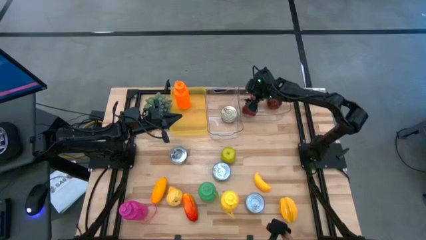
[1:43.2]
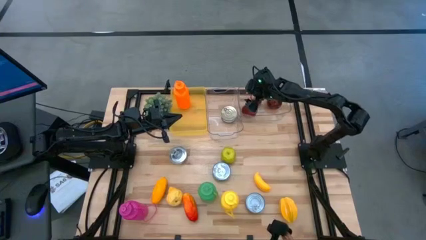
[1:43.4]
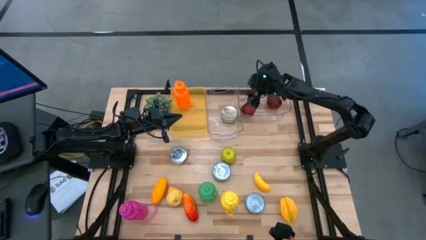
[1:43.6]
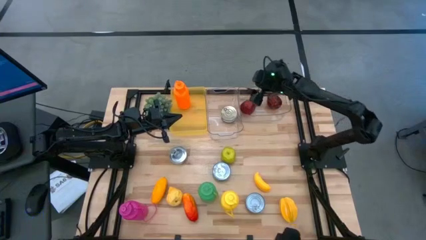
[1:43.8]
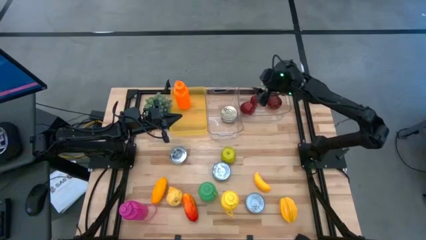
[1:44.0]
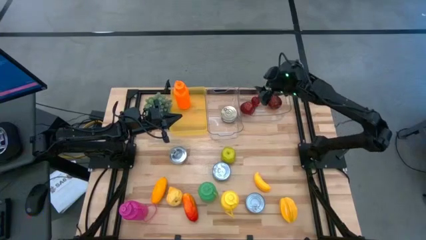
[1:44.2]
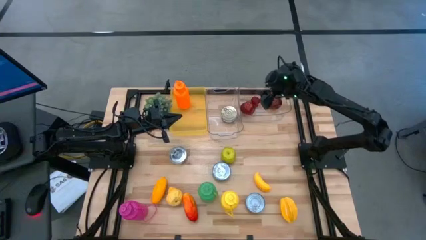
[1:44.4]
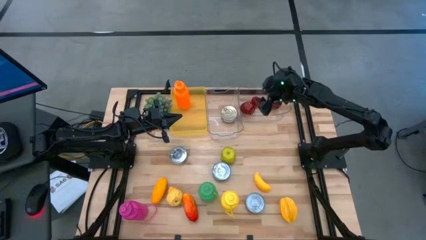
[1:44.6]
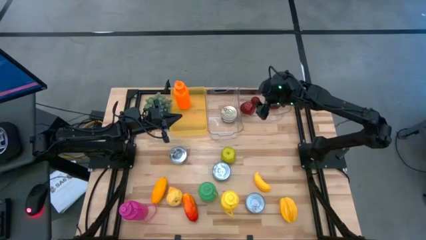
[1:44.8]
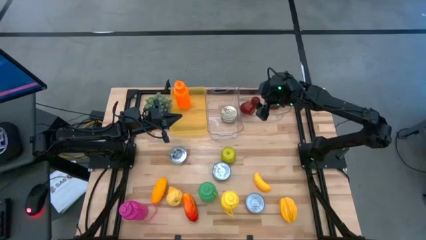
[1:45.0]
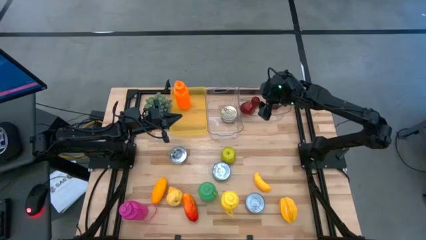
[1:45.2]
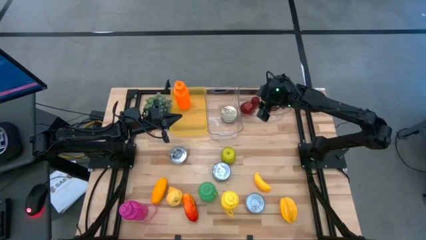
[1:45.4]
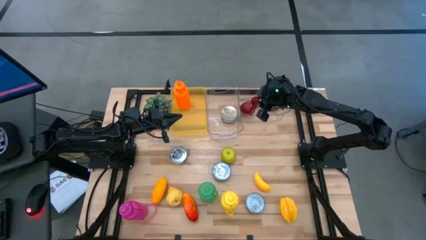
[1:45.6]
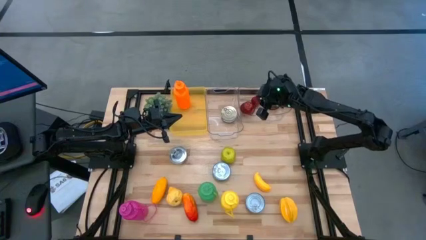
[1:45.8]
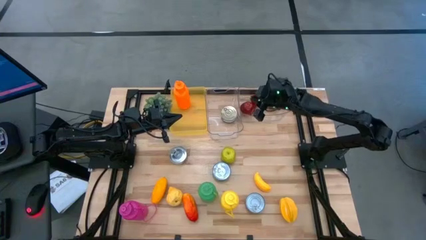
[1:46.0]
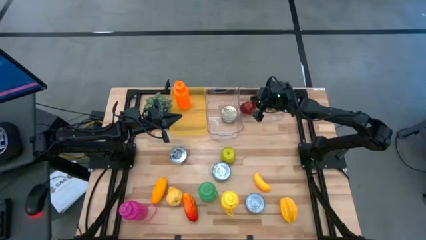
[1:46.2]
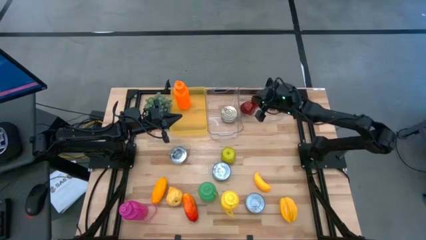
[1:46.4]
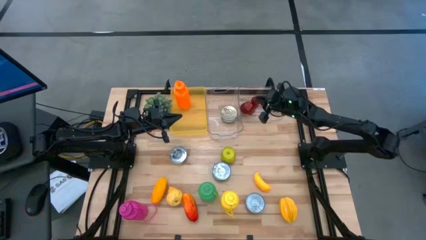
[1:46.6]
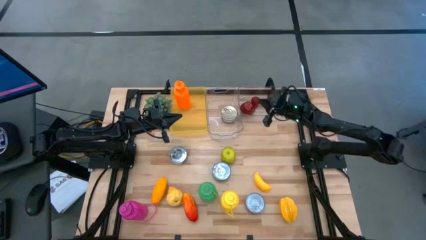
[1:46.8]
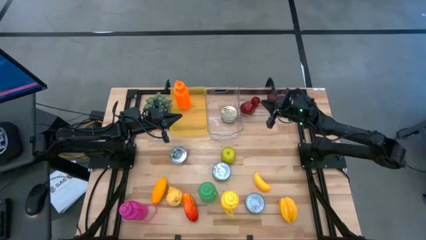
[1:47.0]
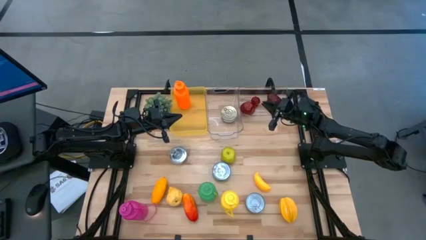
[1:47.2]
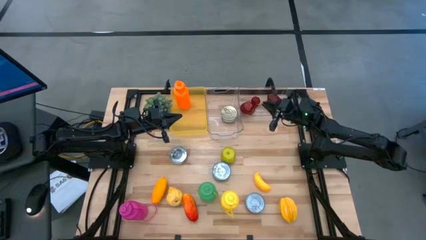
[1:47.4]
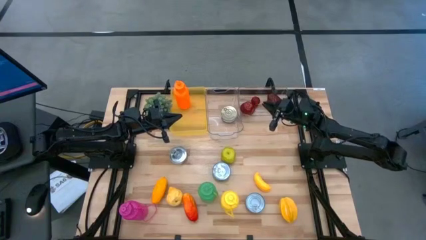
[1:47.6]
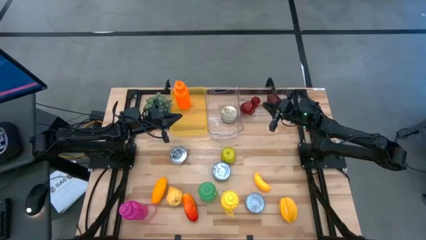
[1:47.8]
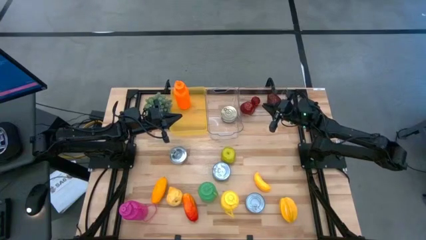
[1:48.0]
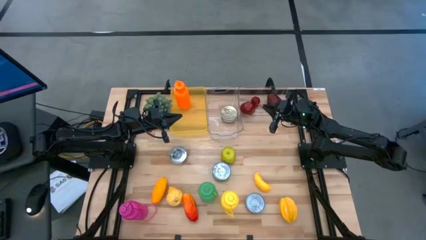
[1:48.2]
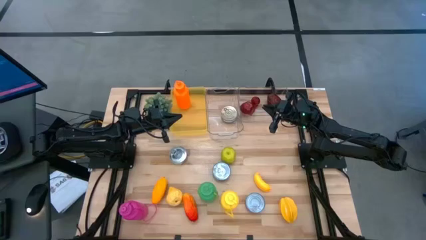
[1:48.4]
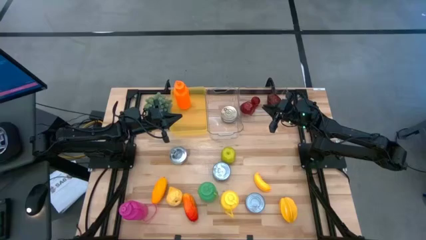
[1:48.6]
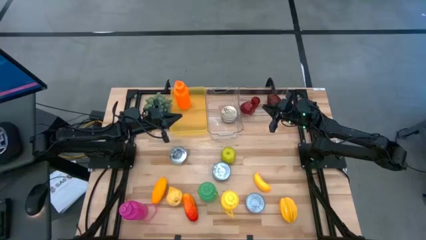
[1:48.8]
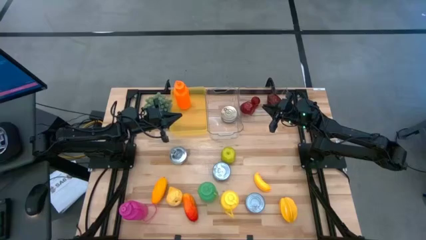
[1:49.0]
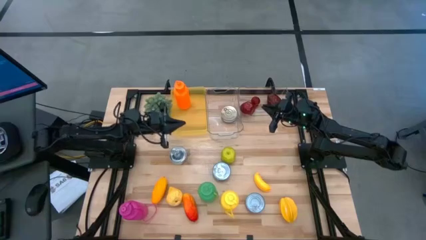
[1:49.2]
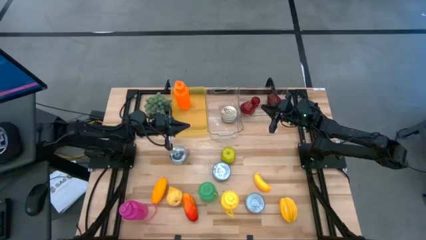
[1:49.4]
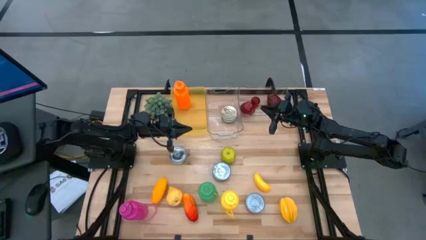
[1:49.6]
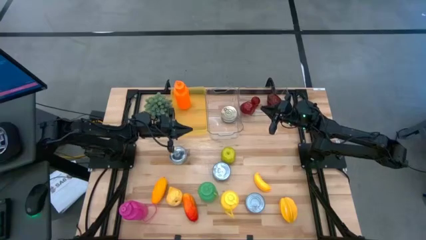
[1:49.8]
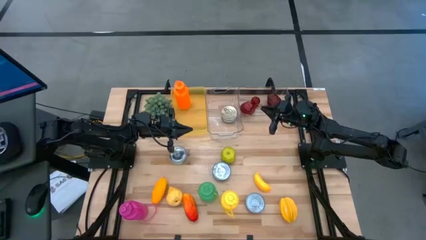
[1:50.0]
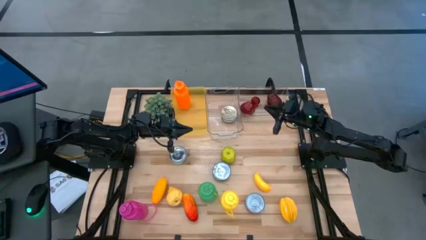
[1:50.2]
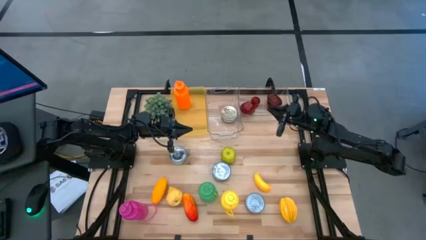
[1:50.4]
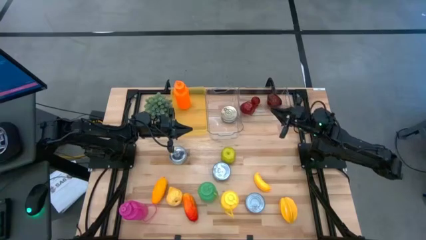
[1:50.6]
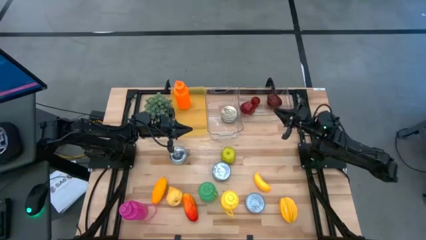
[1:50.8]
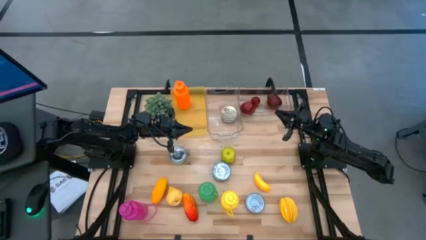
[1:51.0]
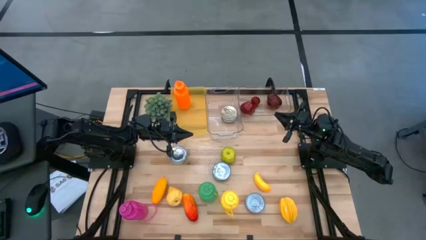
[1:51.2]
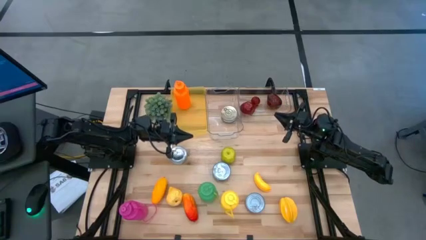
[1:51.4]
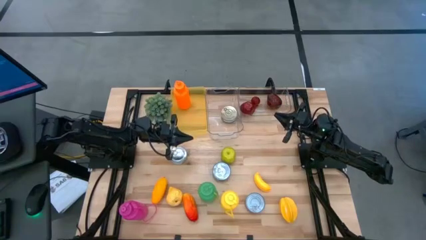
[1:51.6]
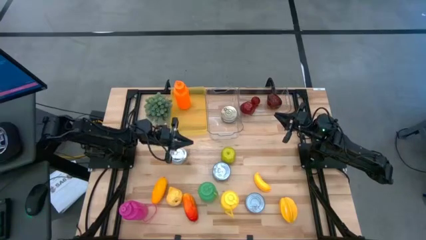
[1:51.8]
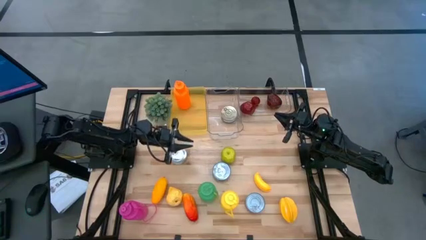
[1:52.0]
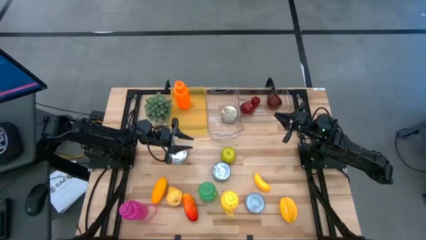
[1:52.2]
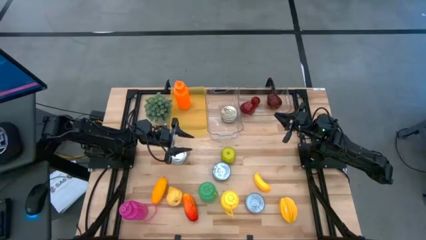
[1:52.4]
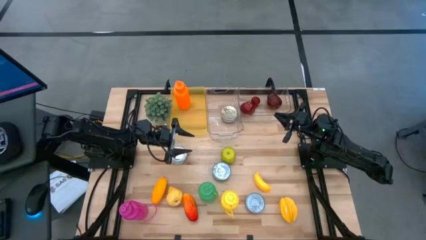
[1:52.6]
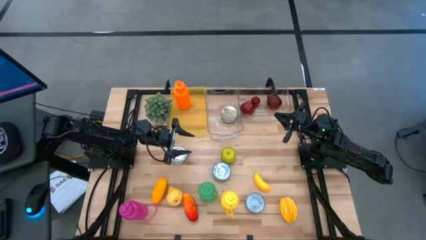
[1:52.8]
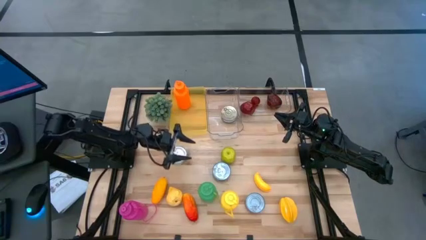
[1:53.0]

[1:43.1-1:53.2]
Task: Pick & Place Food Item
Put the green bottle into the yellow bin

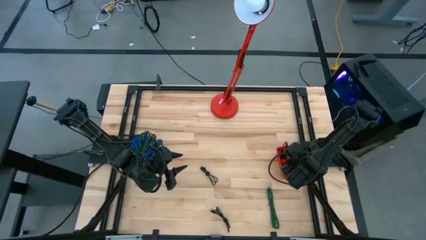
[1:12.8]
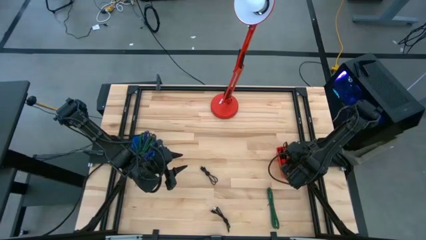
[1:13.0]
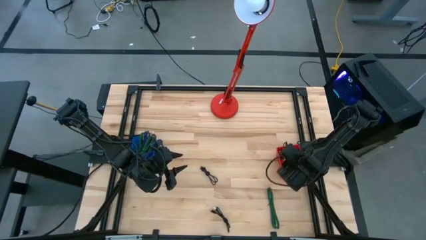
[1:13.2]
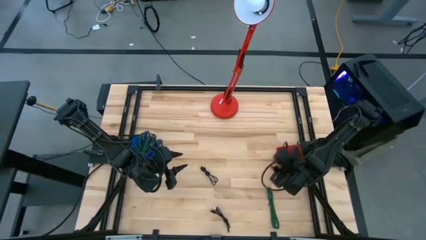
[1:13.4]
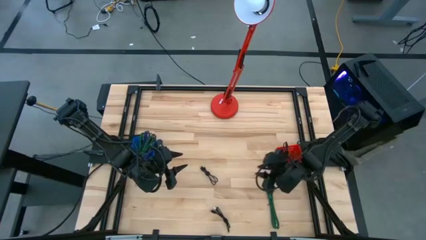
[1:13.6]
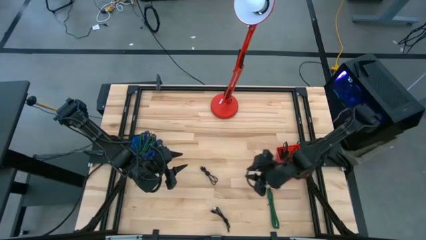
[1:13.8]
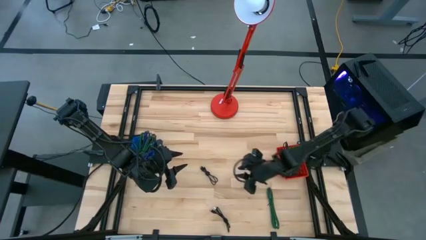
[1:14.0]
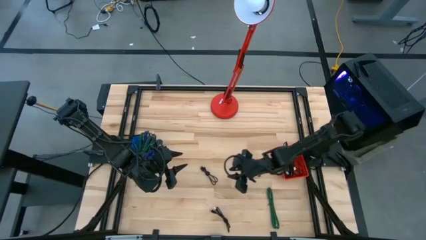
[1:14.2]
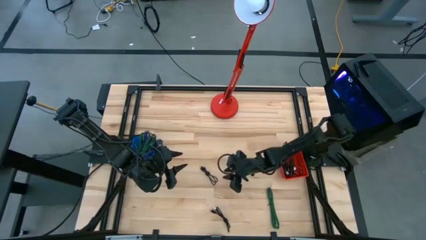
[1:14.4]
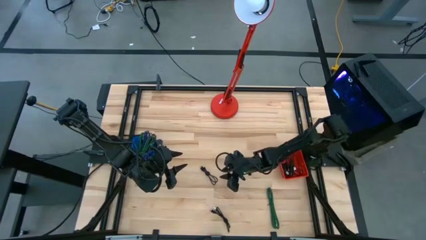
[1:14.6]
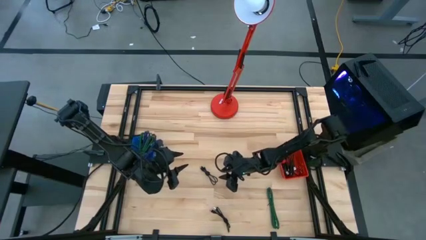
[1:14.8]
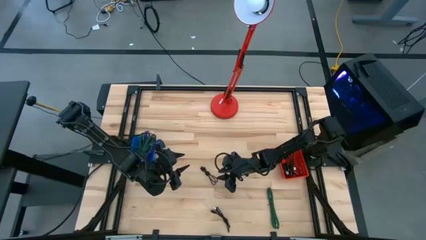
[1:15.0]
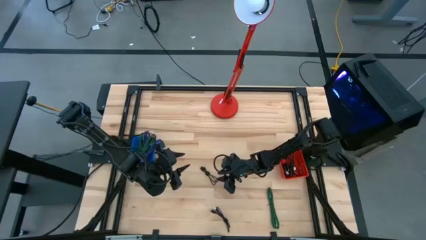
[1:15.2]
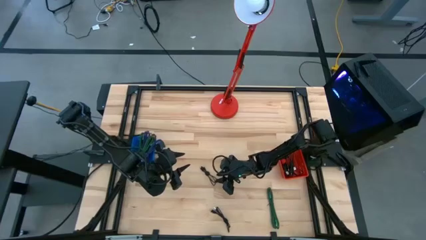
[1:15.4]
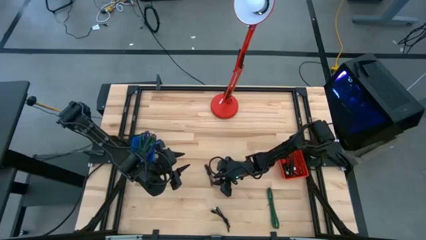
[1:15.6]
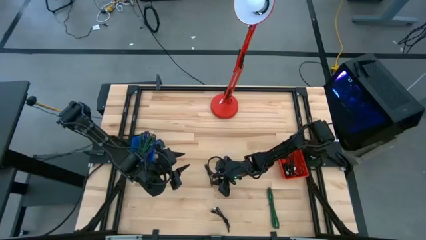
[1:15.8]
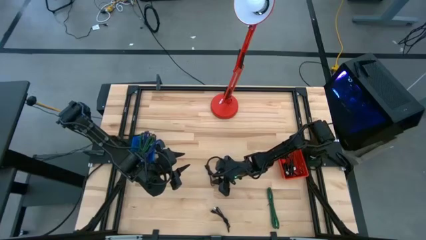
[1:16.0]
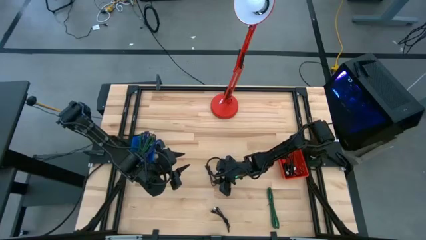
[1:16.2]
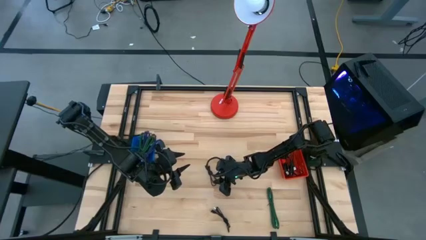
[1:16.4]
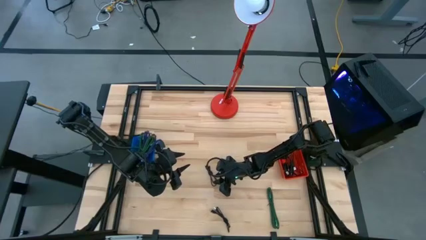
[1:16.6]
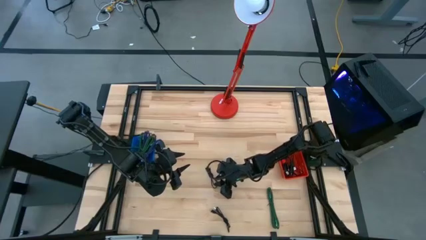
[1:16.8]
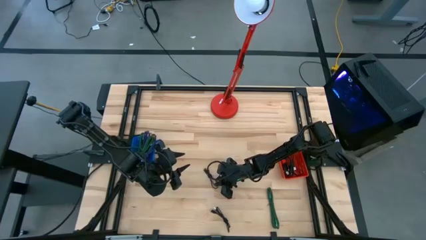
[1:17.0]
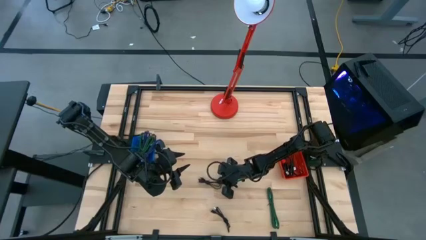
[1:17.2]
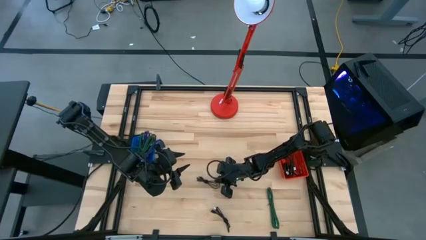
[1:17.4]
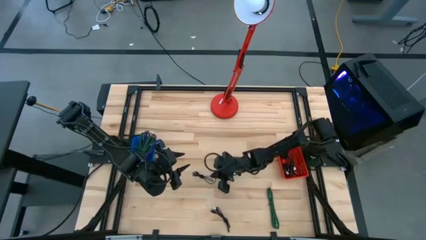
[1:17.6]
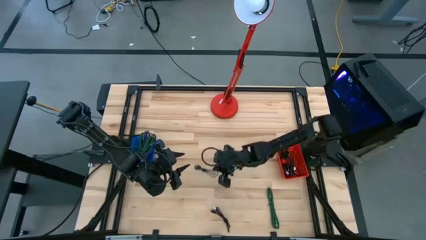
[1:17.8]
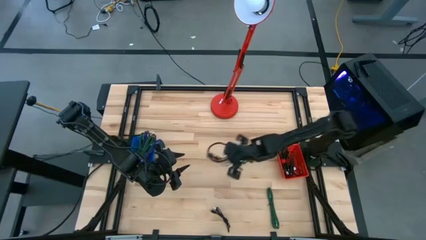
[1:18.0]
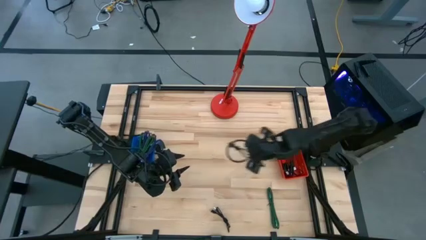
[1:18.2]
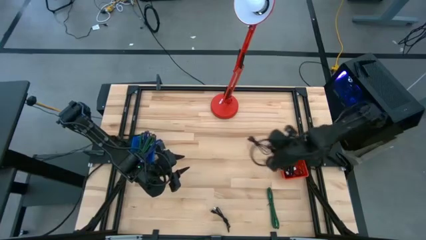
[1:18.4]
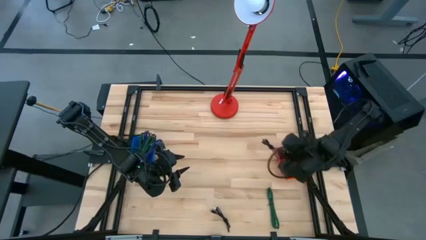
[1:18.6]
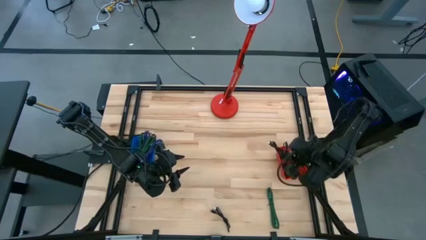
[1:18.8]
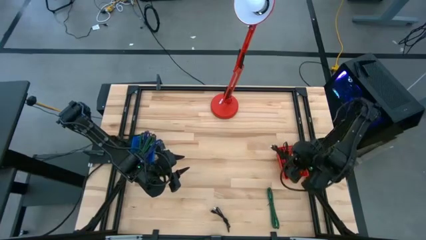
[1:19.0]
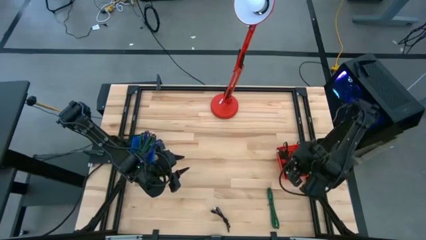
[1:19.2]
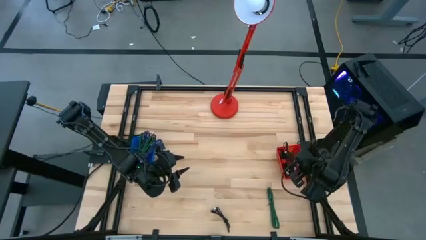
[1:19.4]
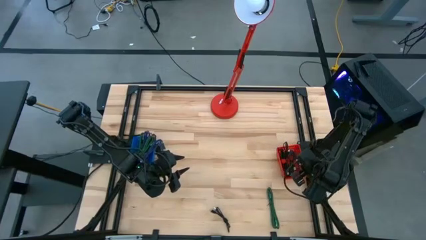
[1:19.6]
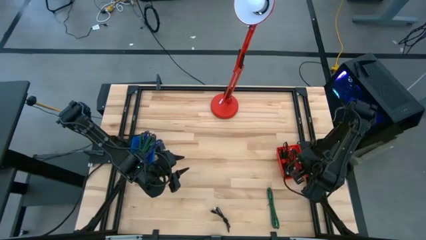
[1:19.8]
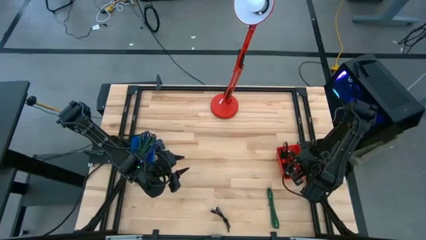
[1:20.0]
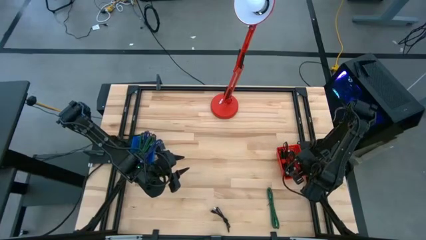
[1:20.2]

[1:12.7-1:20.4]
Task: Pick & Place USB Port
Put the black charger cable into the red bin
